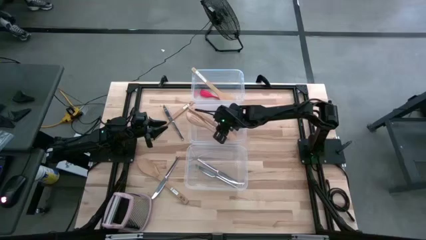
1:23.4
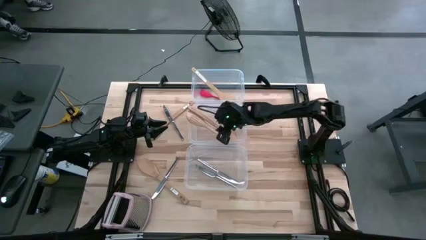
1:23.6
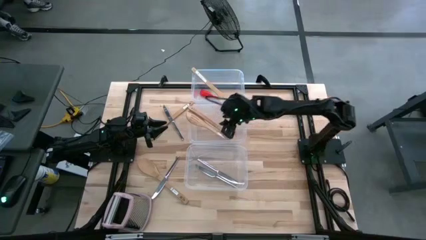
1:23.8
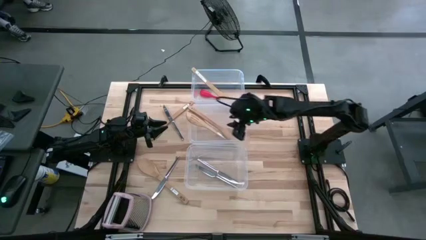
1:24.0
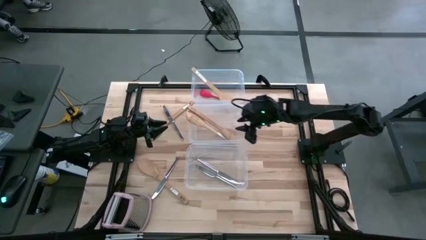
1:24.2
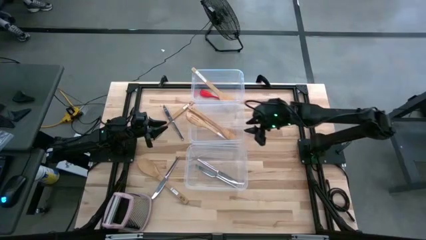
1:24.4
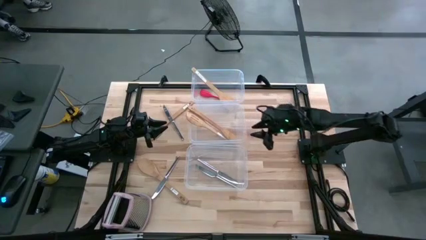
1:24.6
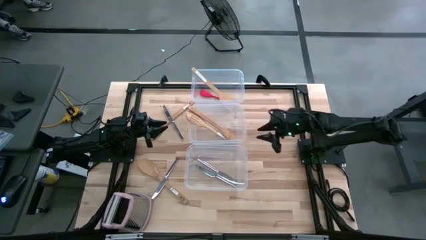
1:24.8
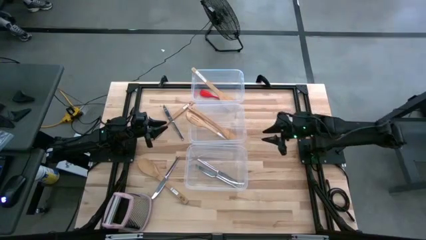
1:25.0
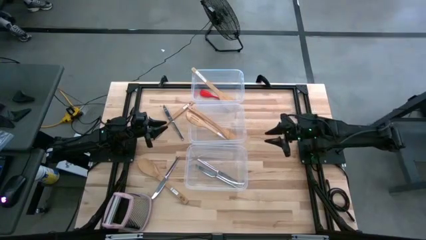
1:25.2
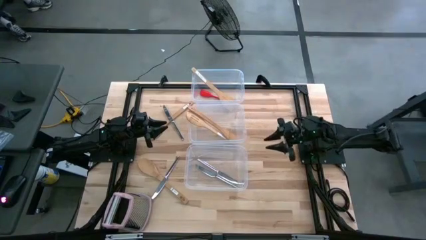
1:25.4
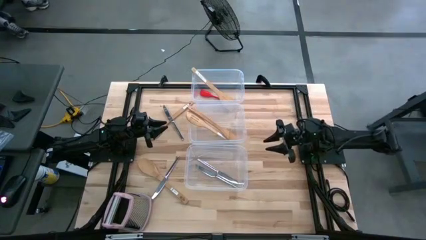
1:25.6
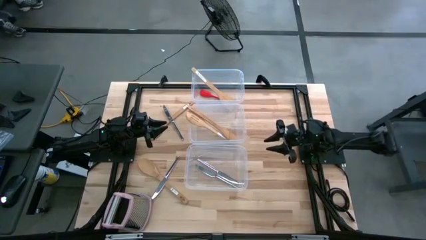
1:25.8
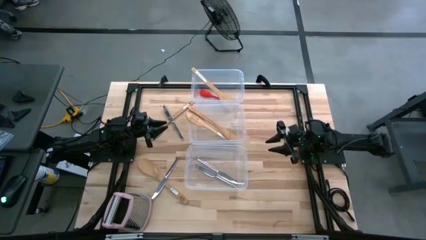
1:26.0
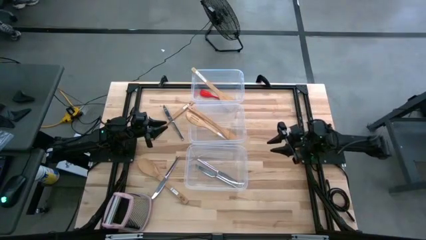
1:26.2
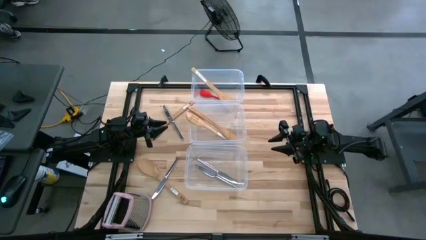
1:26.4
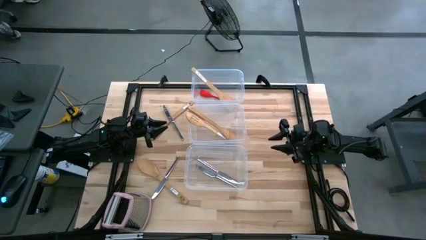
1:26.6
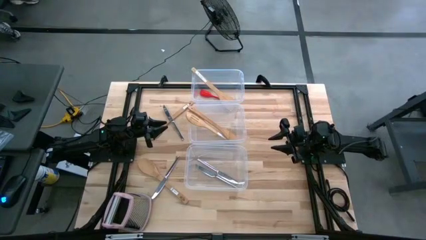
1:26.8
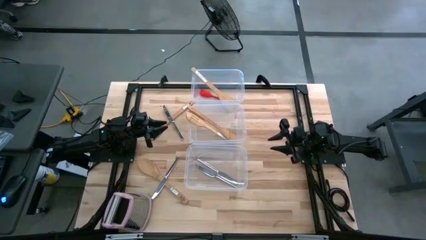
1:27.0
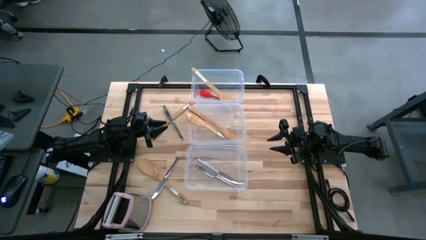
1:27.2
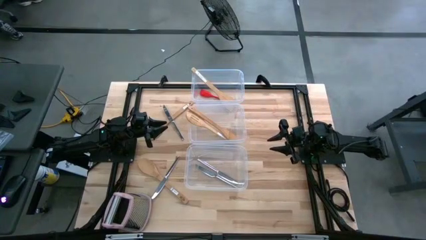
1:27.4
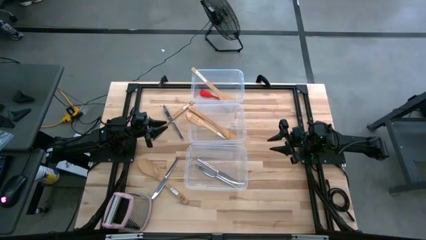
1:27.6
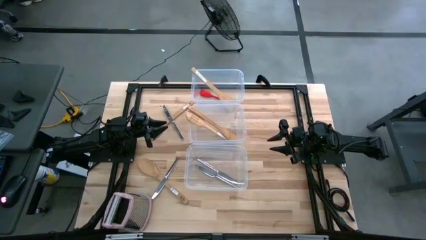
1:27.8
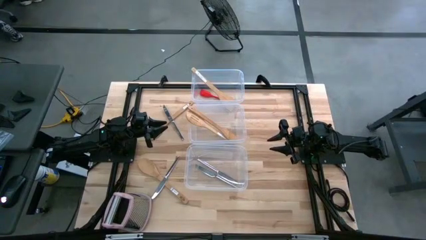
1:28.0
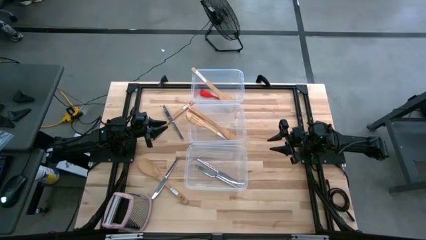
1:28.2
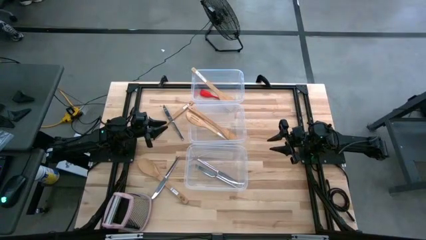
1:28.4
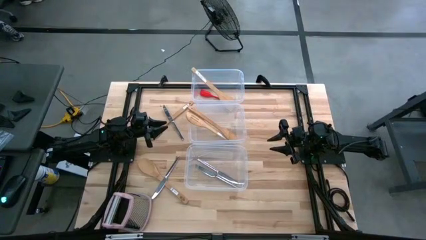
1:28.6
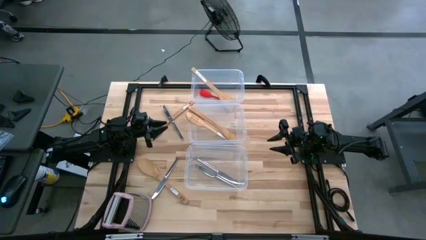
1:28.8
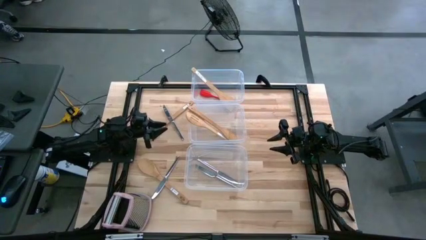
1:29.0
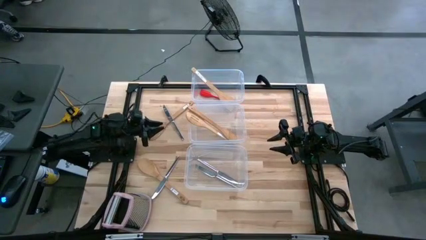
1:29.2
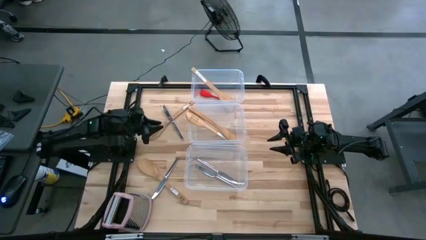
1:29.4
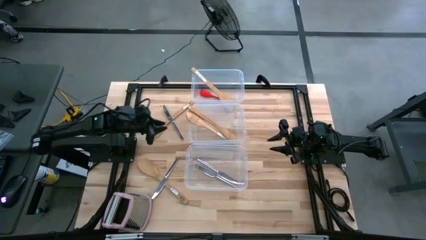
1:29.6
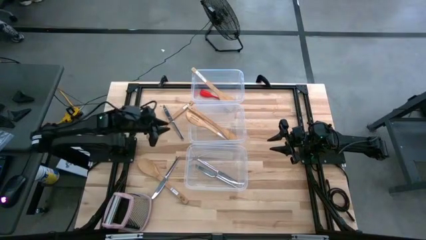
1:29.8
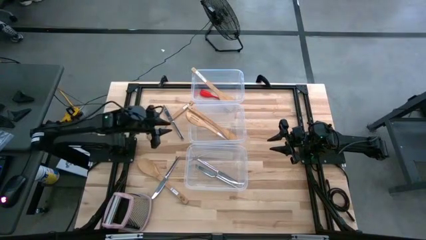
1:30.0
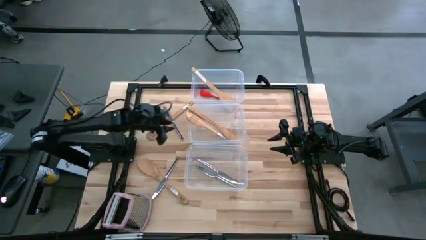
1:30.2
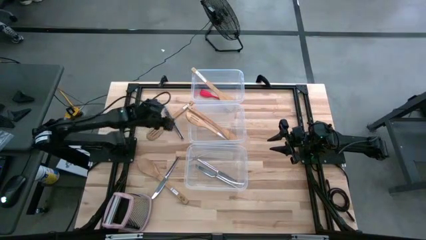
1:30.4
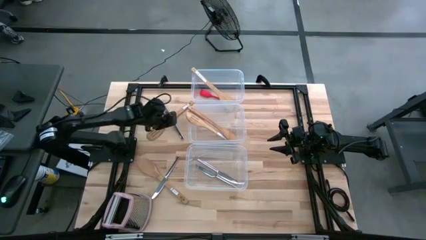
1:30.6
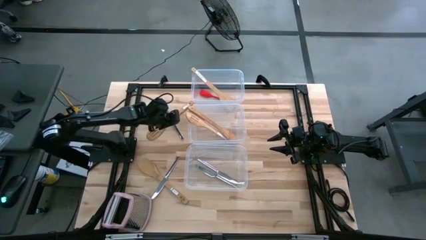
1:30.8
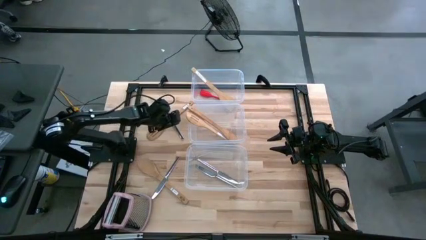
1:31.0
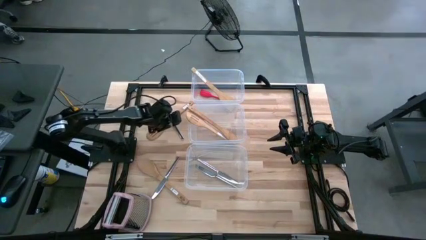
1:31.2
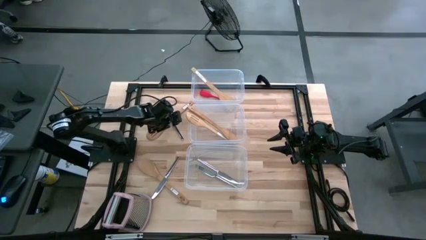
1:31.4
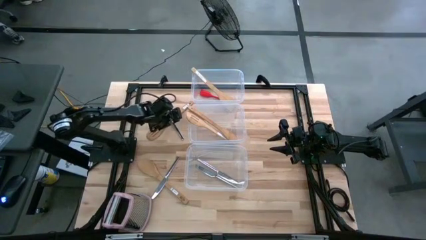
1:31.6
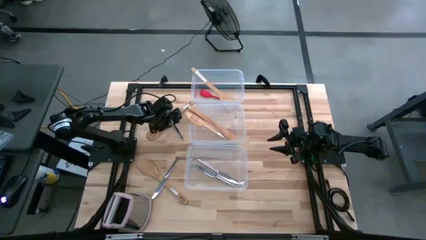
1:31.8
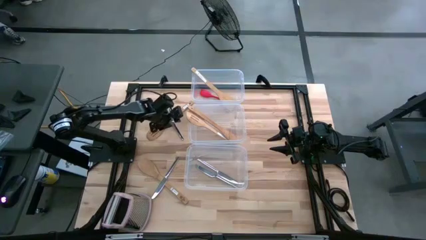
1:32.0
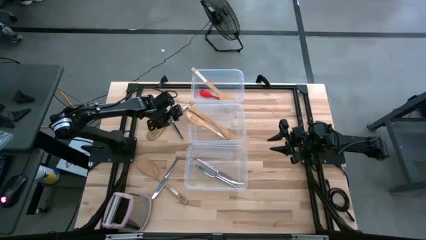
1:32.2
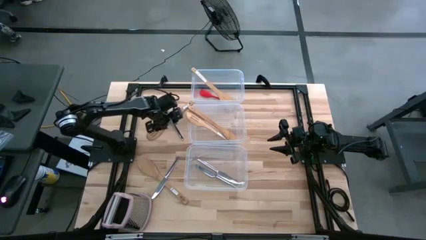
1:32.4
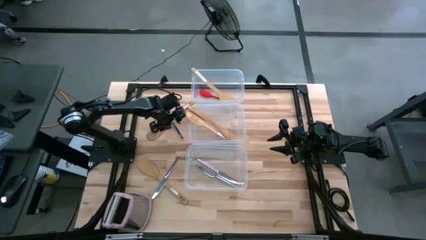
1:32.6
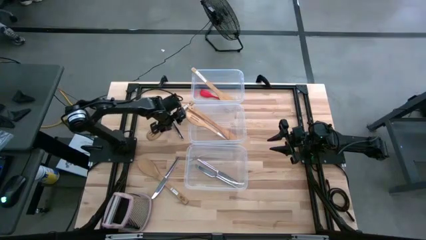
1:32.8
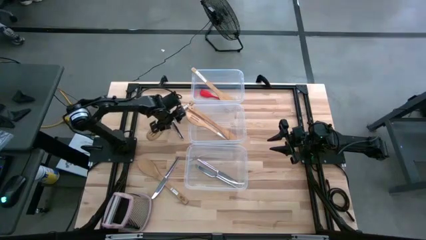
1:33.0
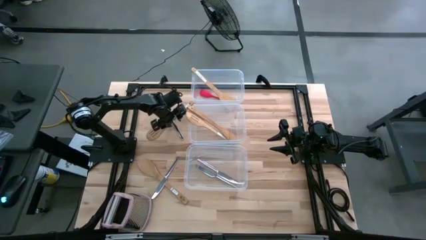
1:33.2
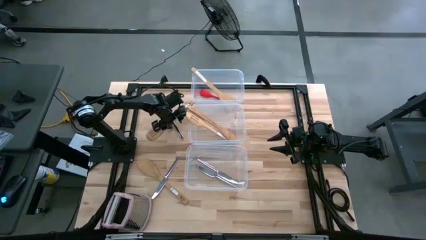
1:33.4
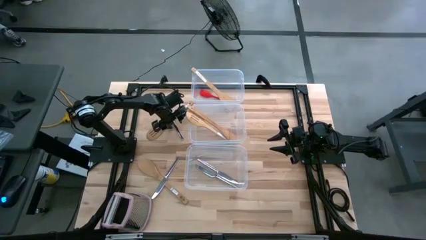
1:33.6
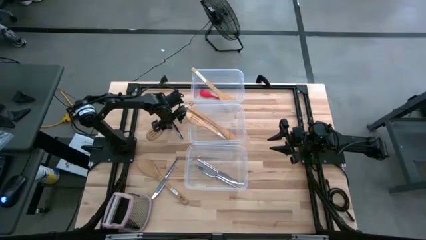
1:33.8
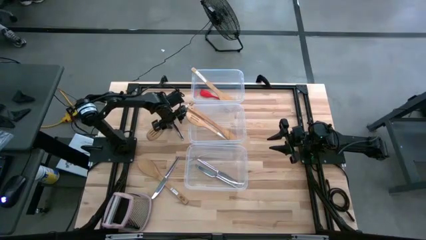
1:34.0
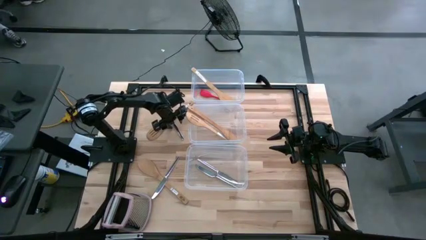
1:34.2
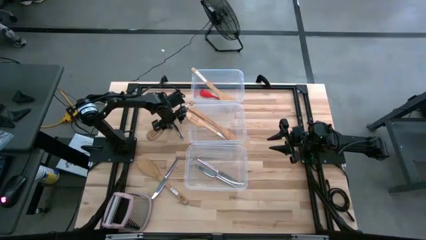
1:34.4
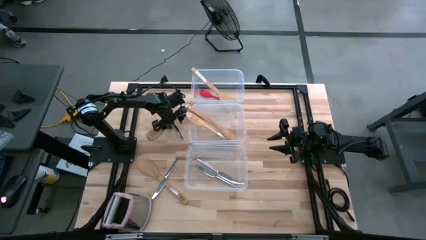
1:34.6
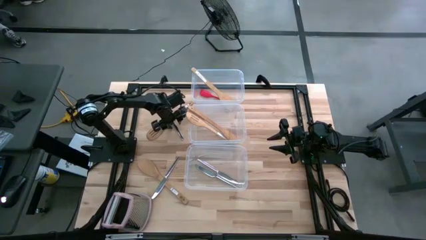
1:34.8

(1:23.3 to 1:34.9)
Task: Pick & Place Kitchen Items
Put the silver knife into the bottom transparent bin

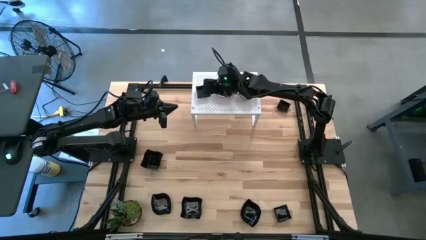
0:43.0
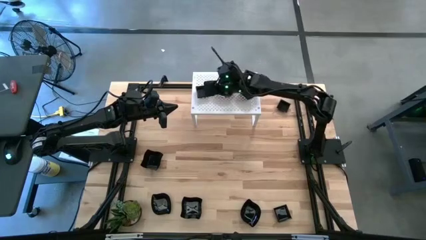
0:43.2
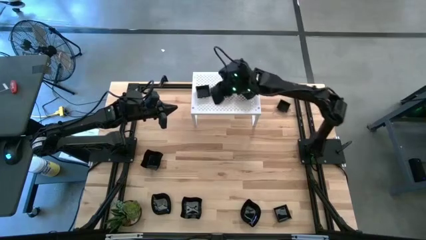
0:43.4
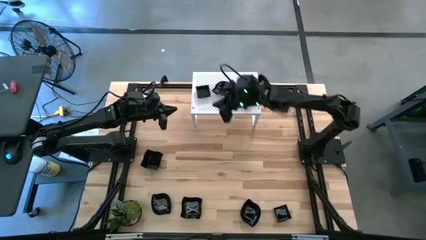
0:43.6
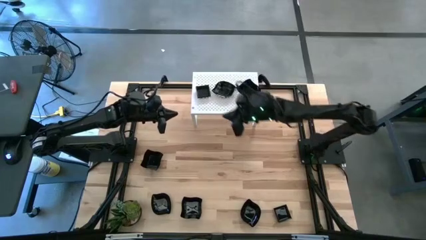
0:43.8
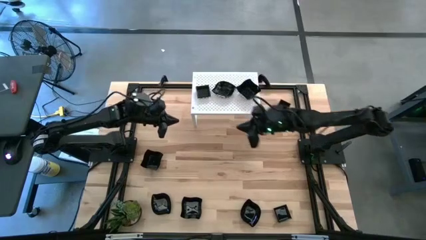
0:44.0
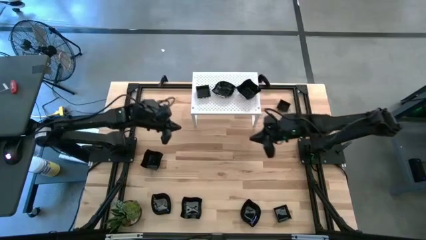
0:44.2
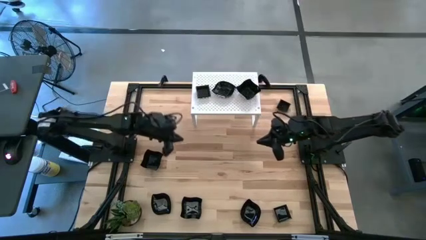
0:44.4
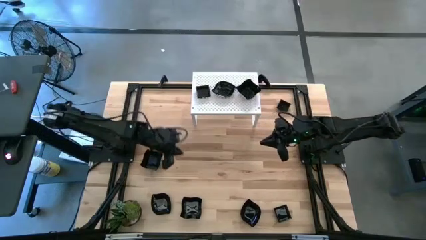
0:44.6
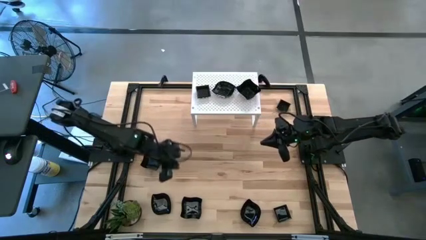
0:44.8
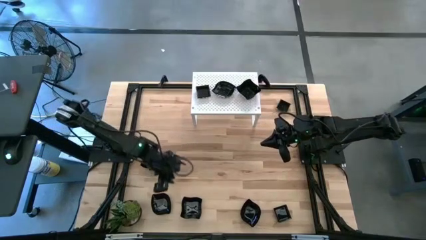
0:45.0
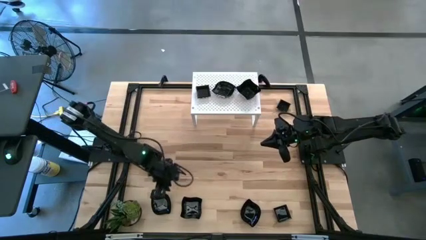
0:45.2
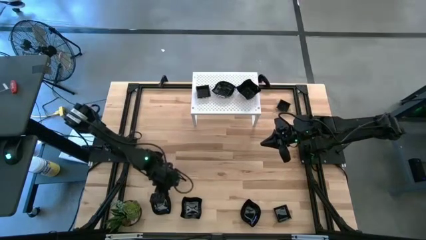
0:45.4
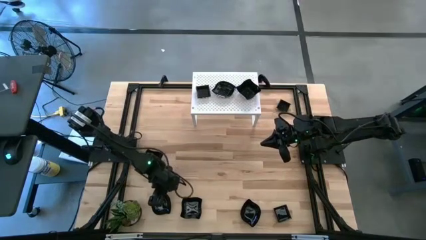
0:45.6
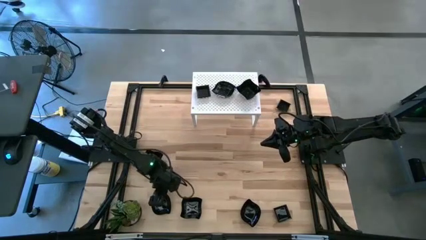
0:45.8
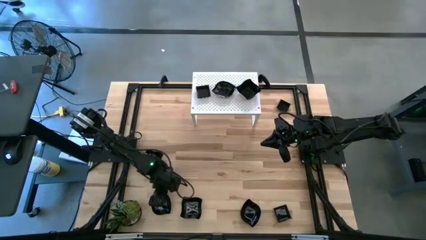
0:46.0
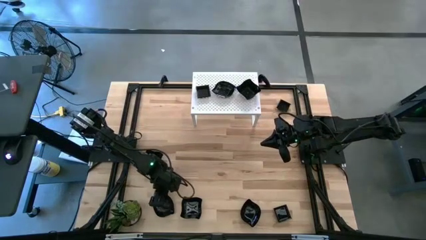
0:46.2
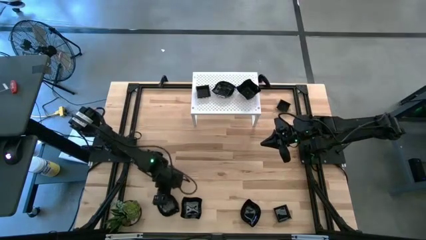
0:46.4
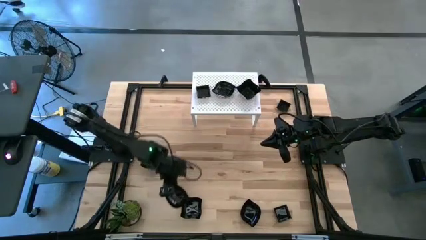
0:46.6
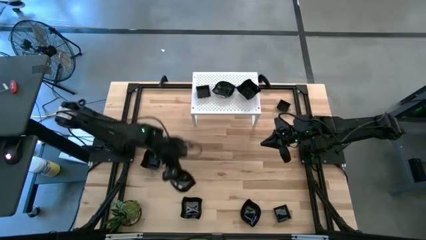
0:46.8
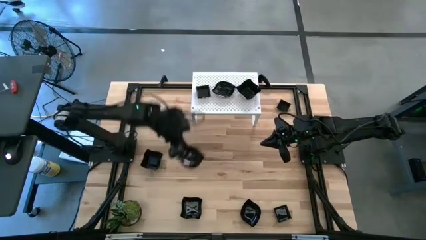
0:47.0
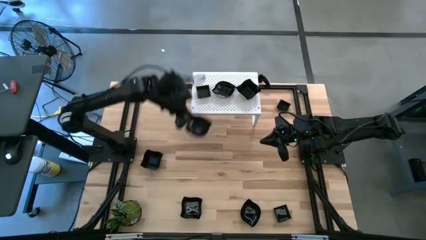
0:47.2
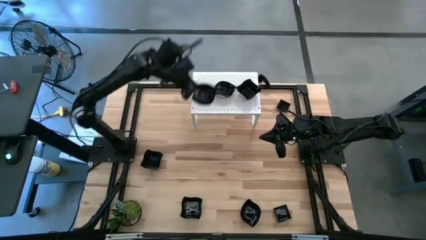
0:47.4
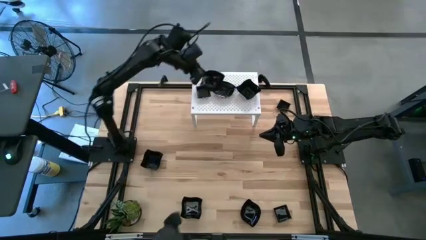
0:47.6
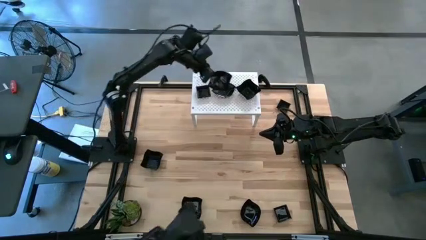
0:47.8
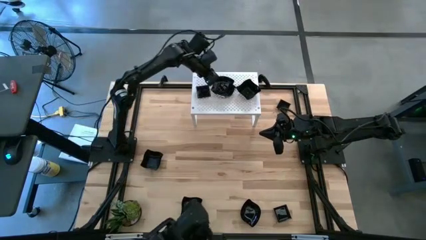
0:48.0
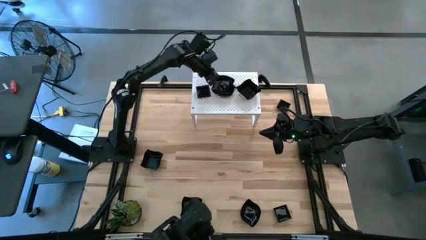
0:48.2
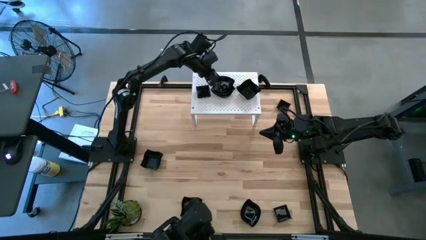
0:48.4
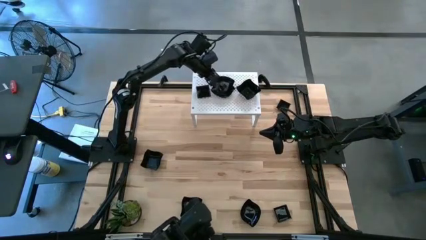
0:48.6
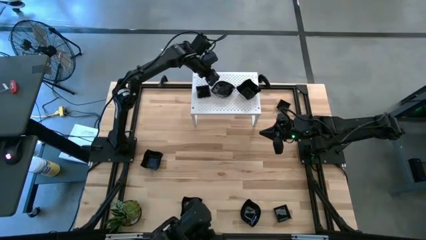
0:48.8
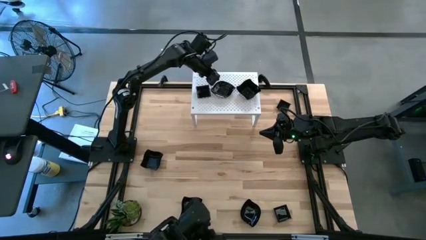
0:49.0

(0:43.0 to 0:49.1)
Task: Pick & Place Mini shaped plates
Stack the black leaf-shaped plate on top of the black leaf-shaped plates on the shelf
